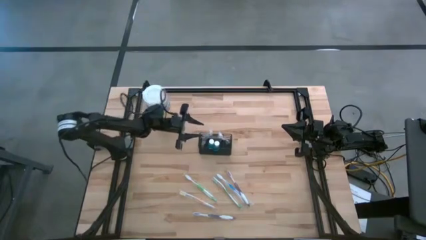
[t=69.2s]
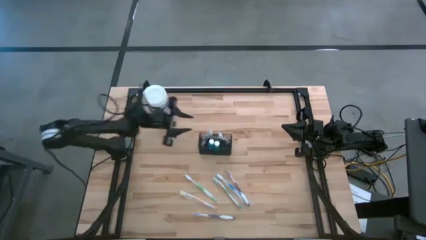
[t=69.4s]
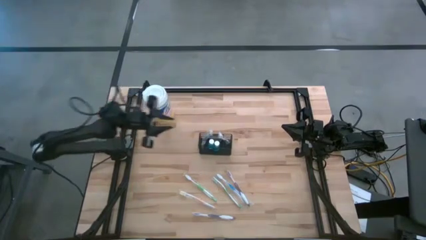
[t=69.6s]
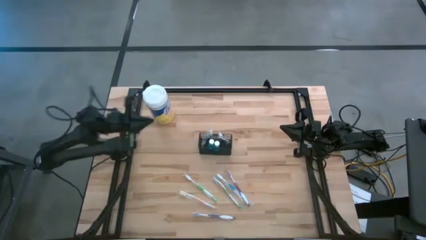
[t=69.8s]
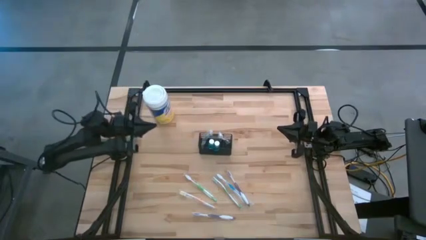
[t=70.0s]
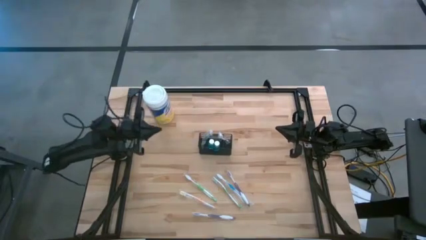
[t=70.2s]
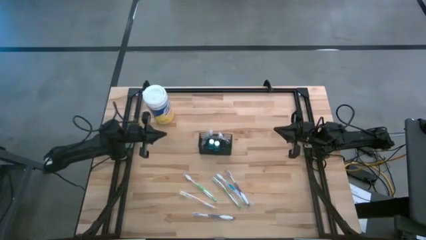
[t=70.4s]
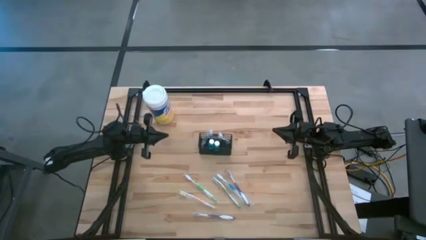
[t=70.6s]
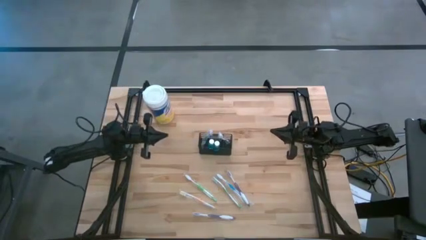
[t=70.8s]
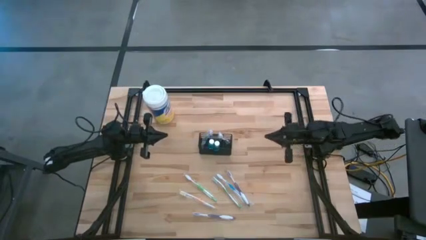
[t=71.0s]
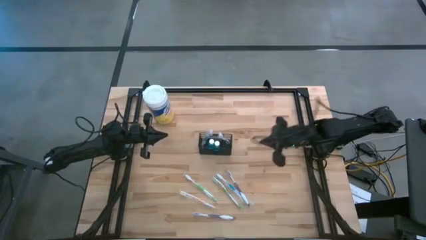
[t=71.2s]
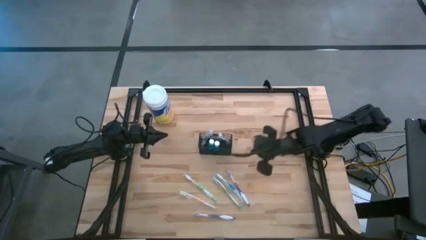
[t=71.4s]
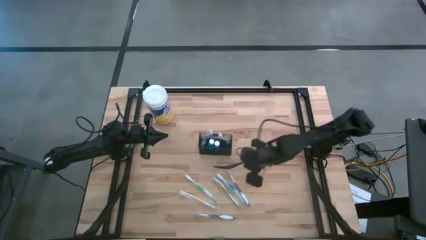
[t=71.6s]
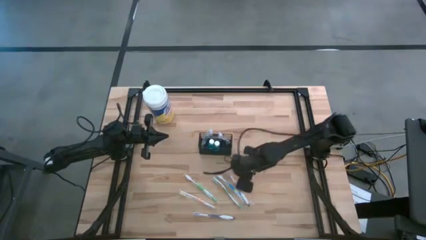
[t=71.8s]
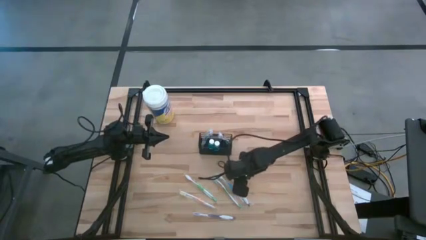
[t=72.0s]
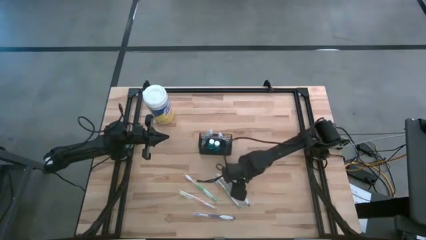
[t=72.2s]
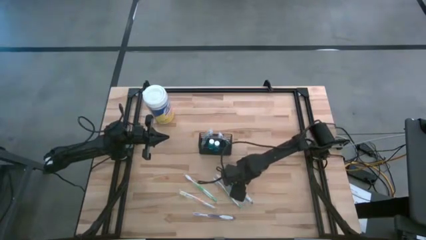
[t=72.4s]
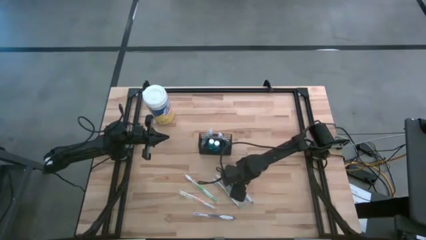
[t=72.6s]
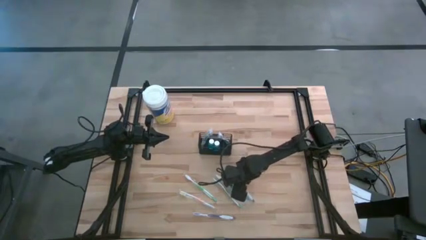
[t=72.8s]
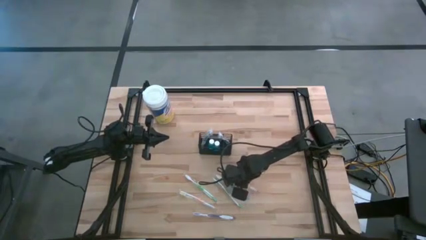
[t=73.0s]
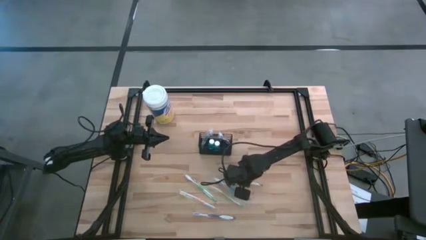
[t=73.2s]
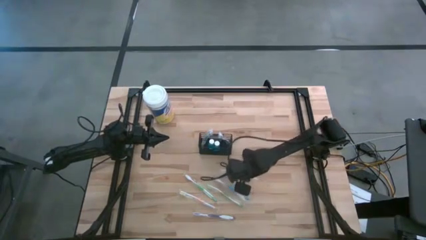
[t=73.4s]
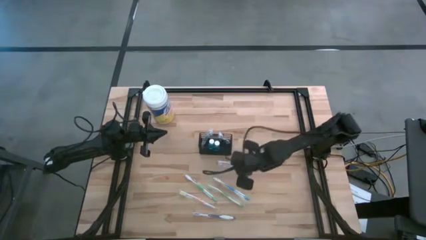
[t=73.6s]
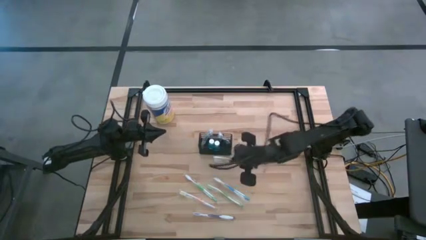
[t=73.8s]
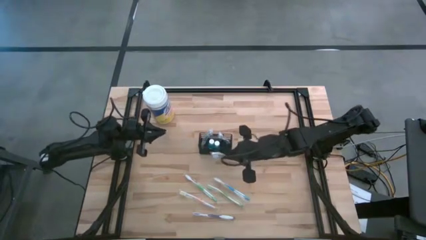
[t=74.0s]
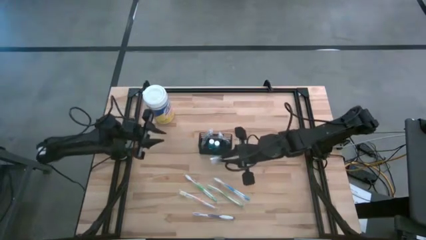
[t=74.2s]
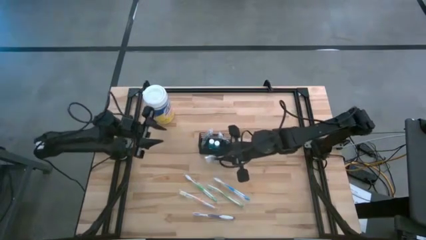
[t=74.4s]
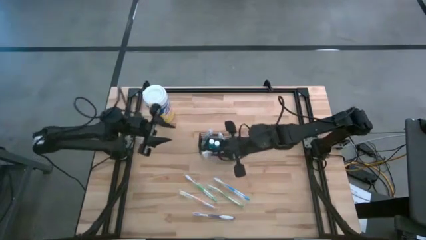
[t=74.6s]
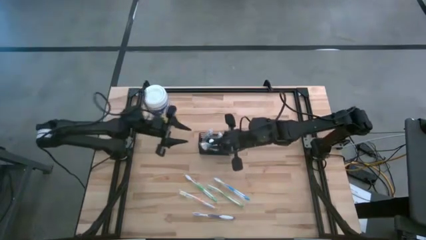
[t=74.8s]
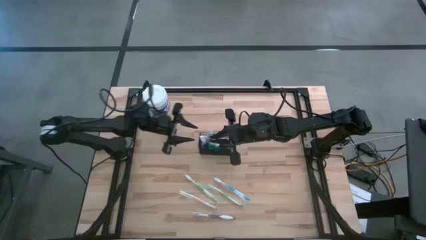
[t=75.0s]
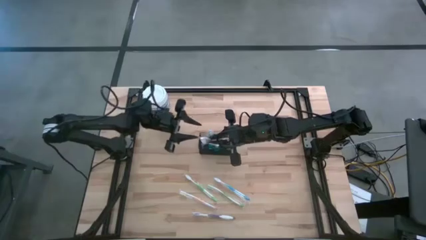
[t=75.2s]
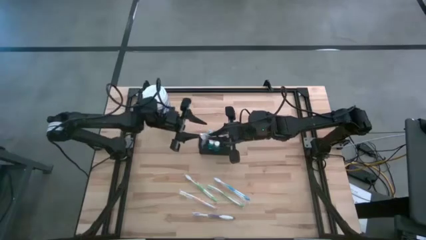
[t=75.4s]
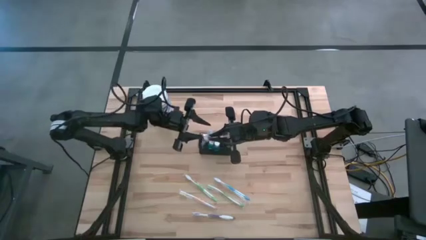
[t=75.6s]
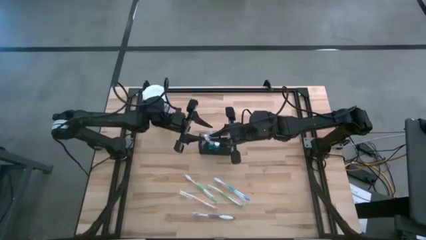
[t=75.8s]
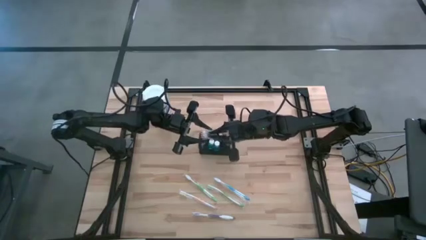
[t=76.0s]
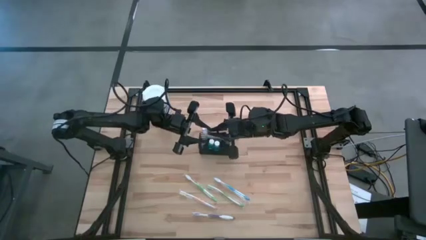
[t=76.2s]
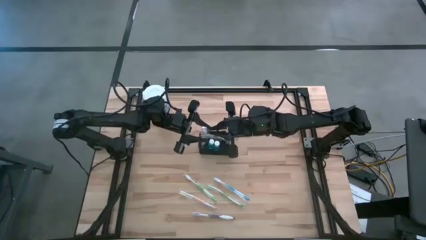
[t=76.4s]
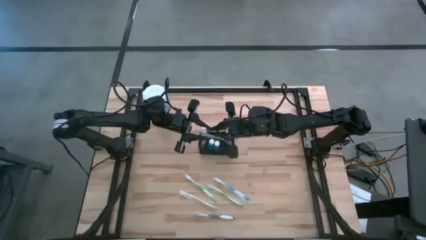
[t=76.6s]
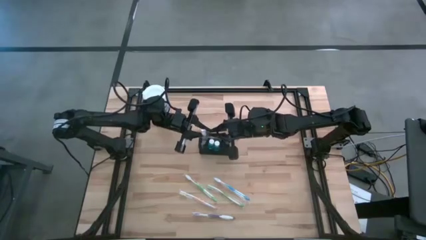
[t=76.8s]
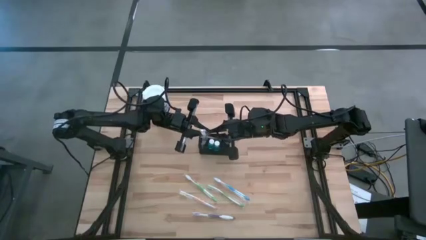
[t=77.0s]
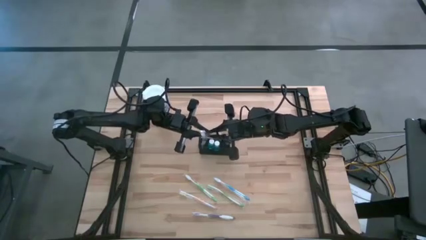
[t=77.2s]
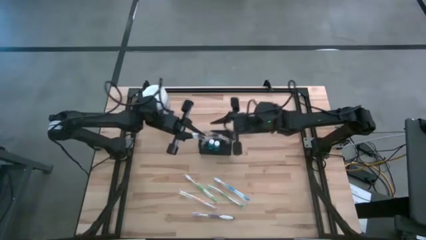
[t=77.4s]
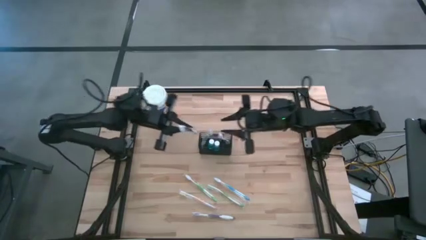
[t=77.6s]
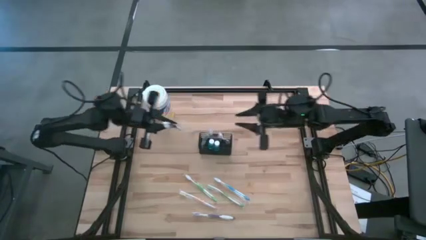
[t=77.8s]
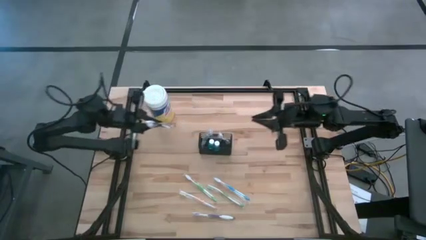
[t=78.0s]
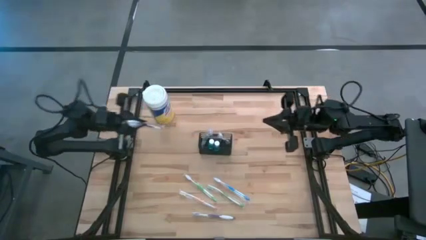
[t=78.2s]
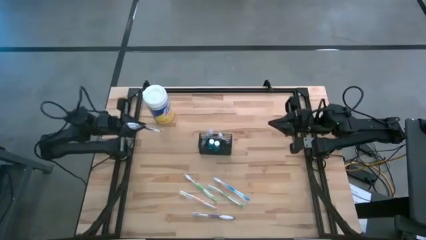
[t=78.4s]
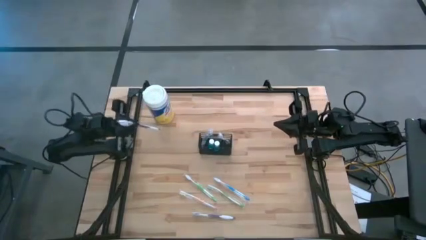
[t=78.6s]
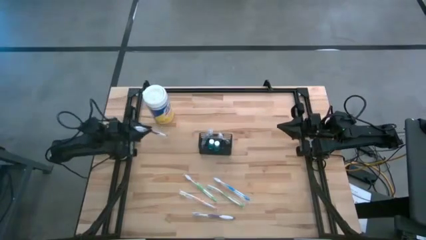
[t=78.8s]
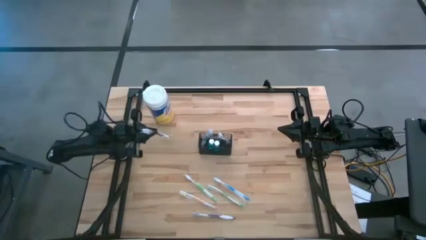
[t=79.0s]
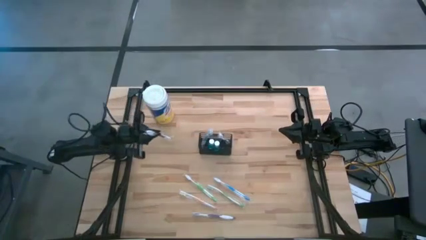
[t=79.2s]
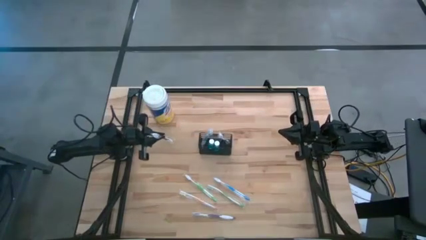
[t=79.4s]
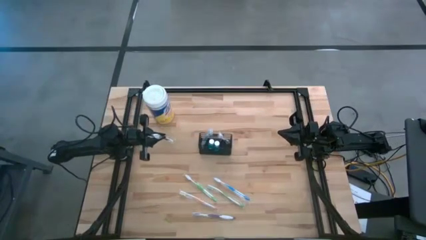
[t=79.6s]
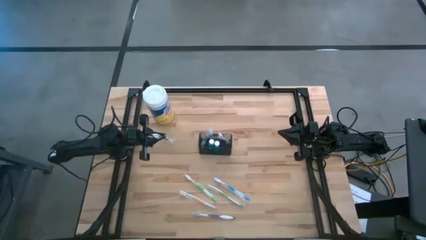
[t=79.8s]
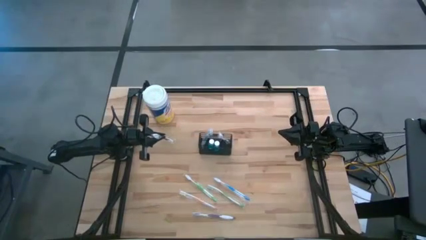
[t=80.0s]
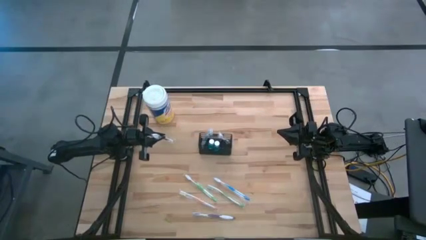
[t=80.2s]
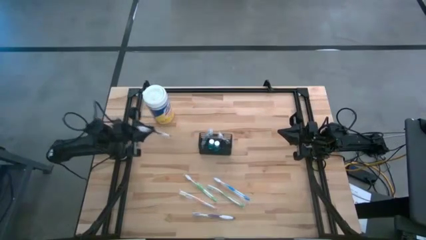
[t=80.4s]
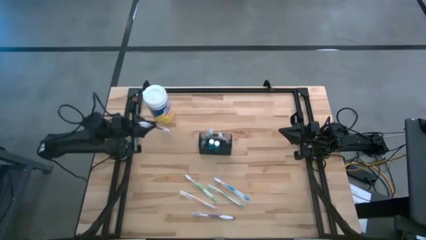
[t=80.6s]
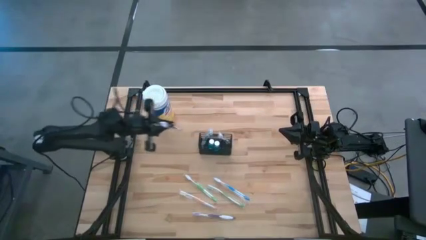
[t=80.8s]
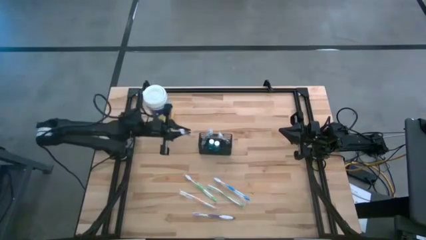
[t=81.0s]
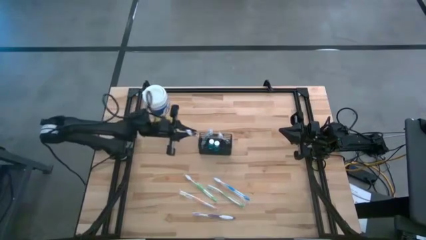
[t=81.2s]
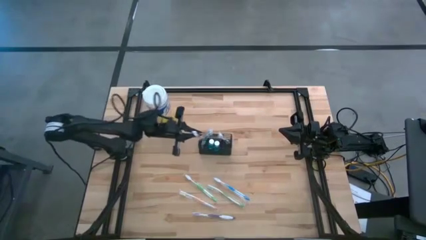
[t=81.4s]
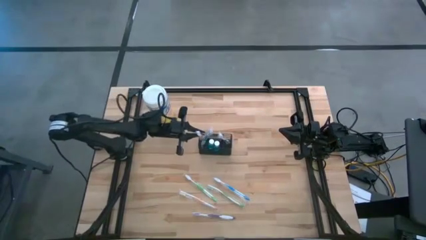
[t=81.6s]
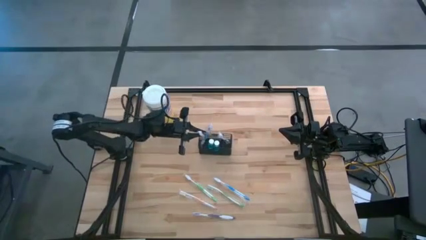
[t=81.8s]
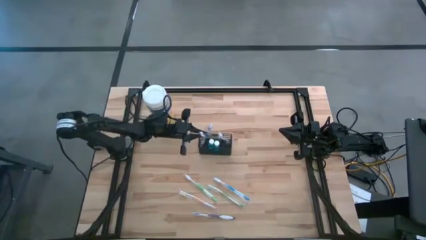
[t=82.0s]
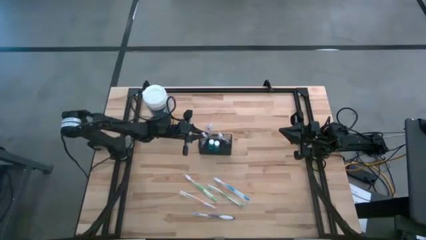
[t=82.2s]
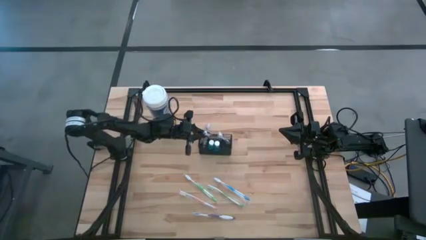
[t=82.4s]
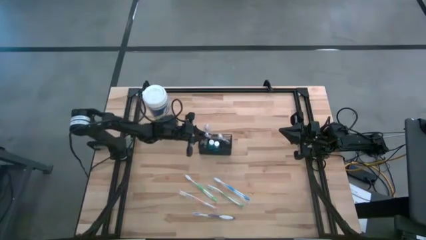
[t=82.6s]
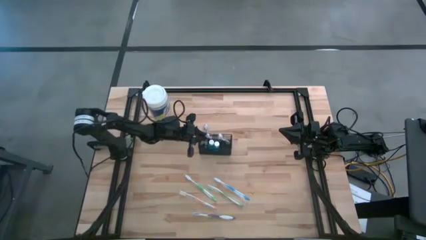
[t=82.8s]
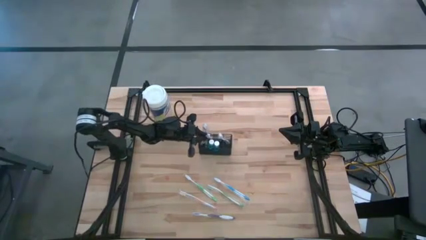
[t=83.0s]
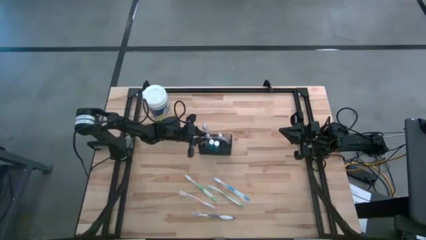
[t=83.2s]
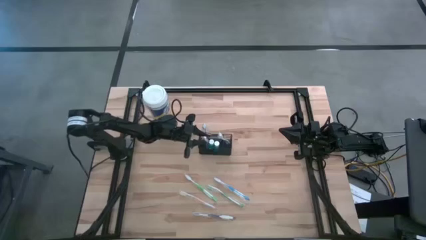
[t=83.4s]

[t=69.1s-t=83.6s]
Task: Pick & Place toothbrushing station
Put the top violet toothbrush into the mesh organizer

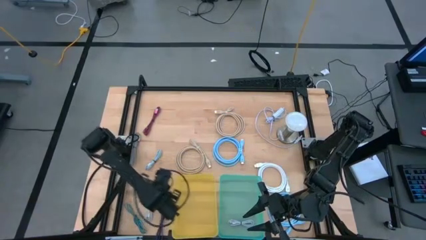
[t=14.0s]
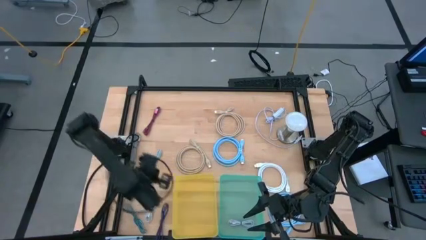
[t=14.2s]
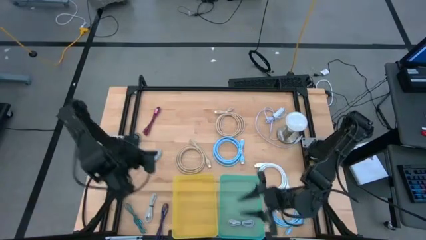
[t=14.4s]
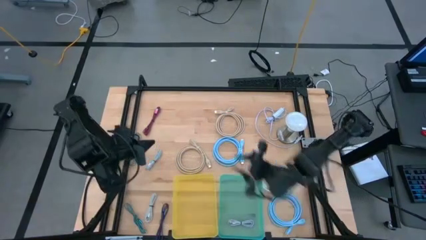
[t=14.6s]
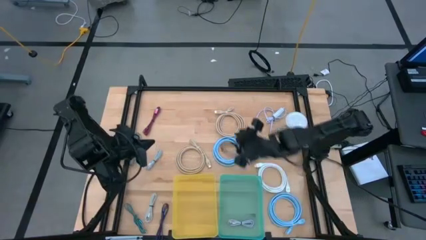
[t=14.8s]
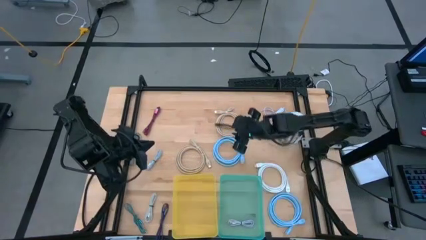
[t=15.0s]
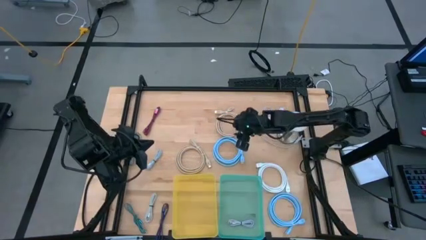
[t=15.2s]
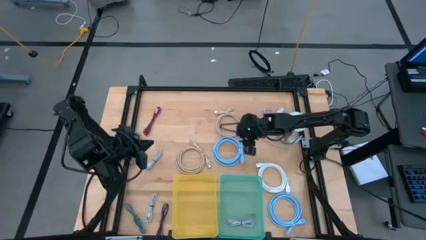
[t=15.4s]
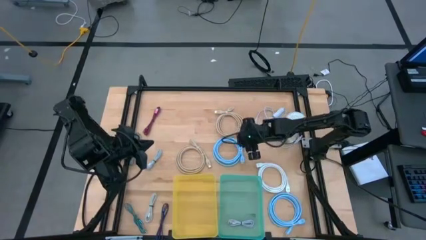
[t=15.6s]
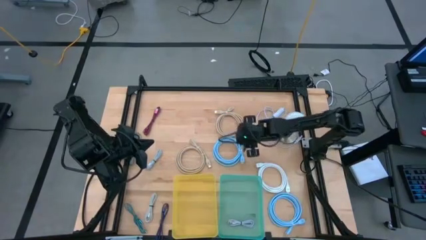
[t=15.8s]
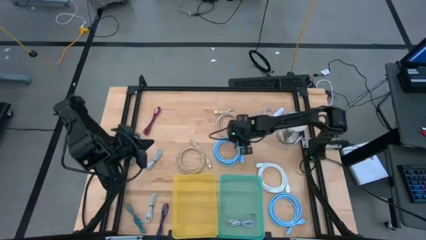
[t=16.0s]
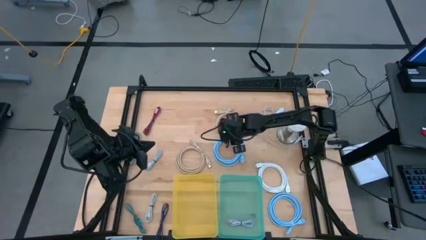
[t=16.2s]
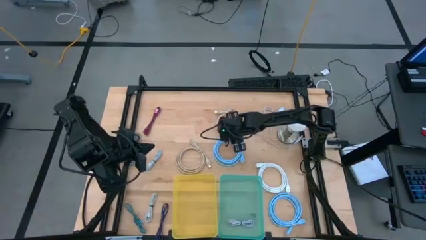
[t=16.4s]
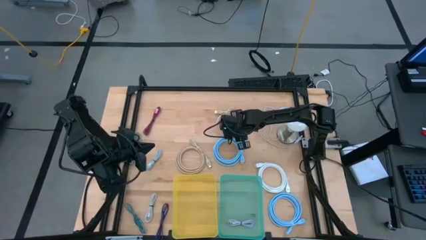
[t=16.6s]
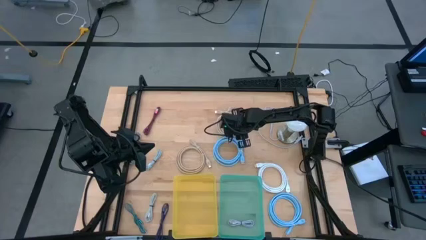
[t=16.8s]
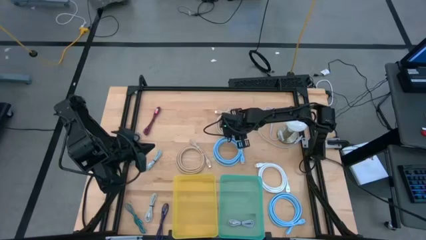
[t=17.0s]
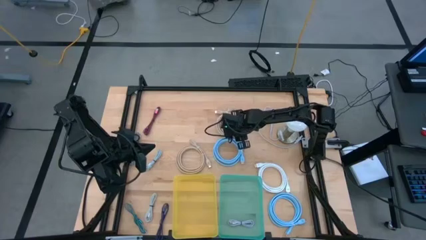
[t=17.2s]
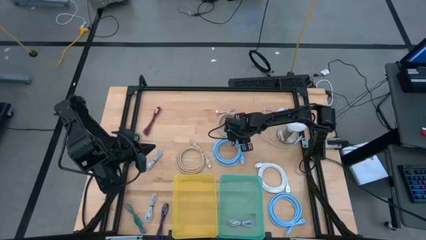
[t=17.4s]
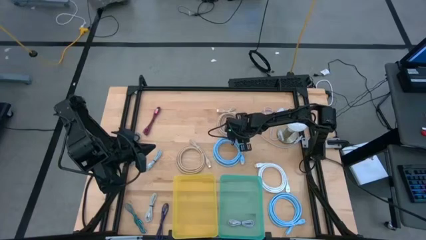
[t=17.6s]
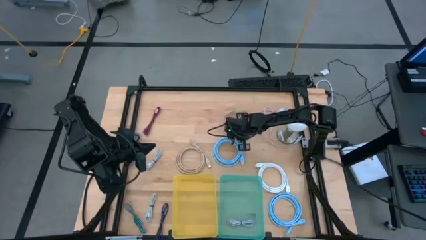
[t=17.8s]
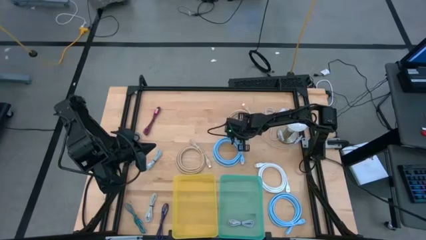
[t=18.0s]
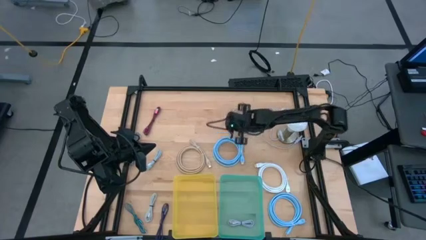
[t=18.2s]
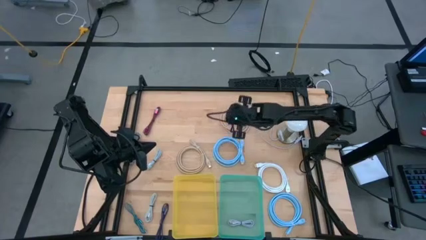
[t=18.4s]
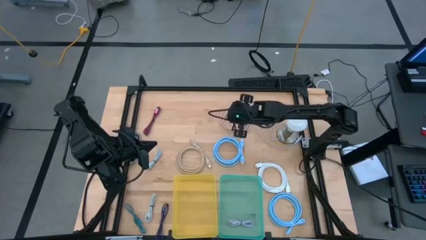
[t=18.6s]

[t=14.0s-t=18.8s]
Task: Pick & Place USB Port
Put the large top brown charger cable into the yellow bin
